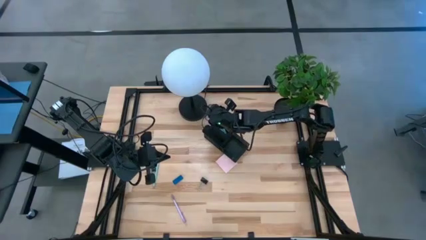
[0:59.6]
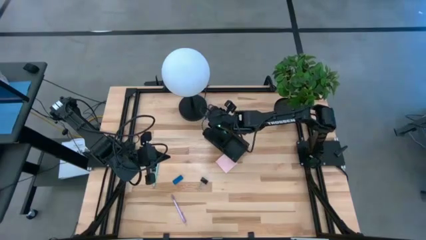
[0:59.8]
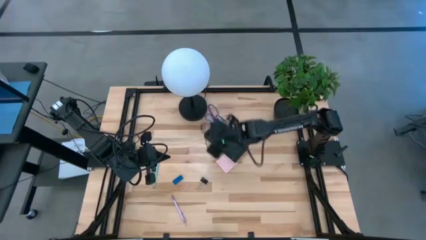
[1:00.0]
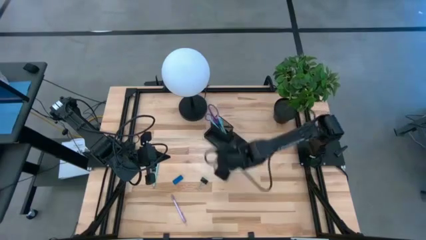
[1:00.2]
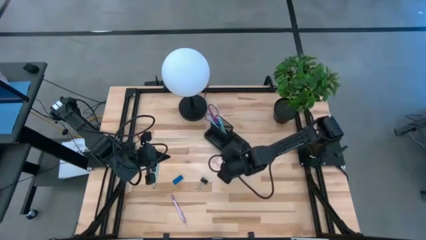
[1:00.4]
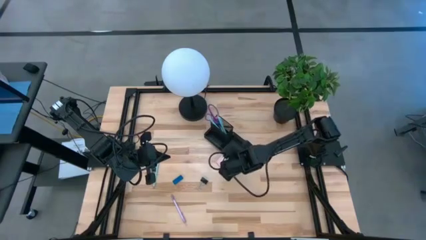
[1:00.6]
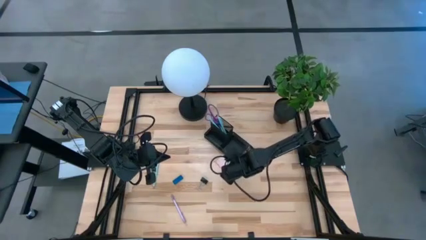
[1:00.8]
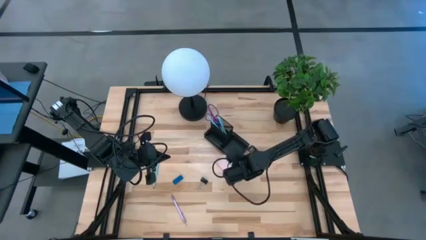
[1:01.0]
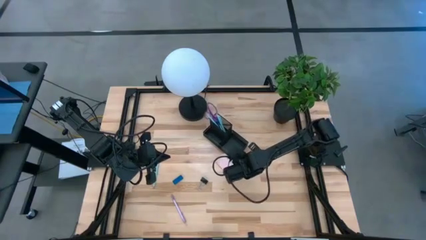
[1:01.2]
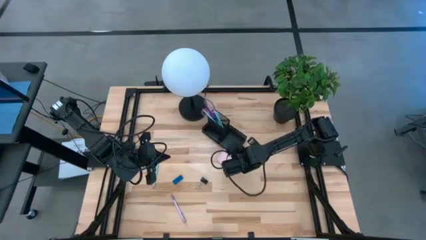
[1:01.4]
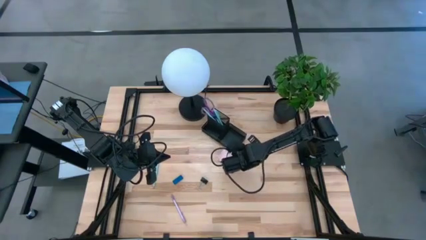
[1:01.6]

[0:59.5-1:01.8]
Task: Pick and place office supplies into organizer
Adjust the desk organizer

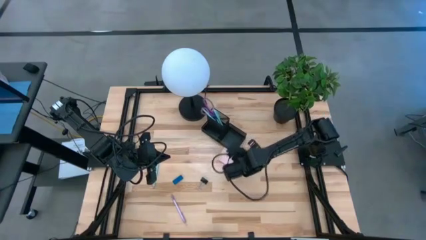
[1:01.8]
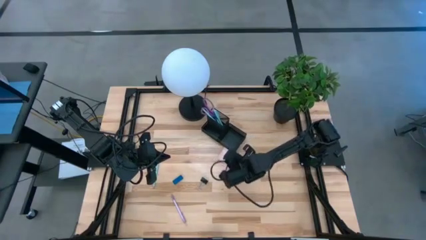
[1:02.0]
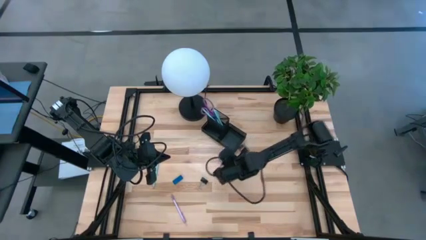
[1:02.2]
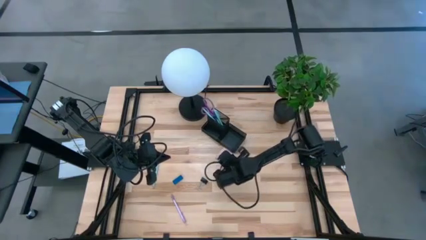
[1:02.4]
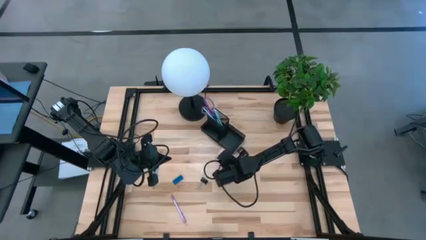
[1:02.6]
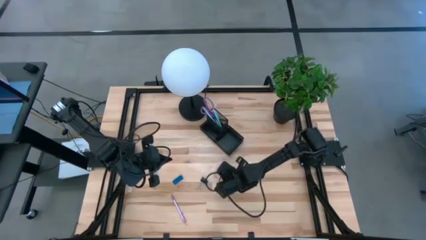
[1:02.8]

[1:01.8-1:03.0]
Adjust the pink sticky note

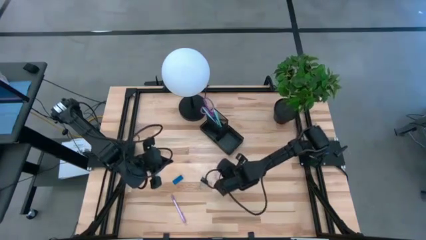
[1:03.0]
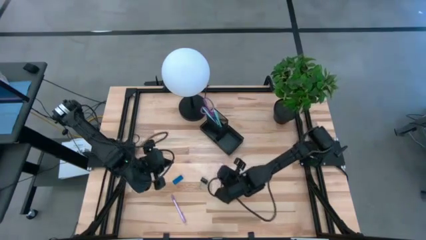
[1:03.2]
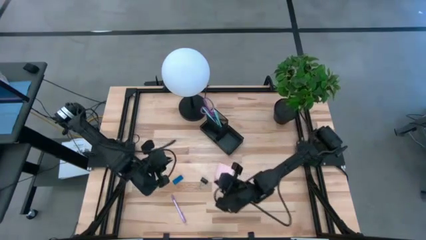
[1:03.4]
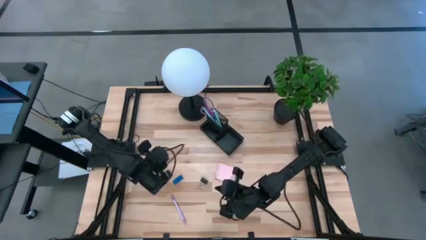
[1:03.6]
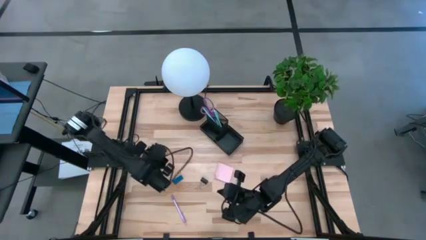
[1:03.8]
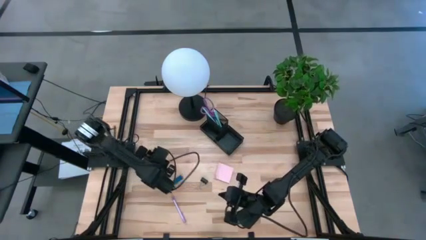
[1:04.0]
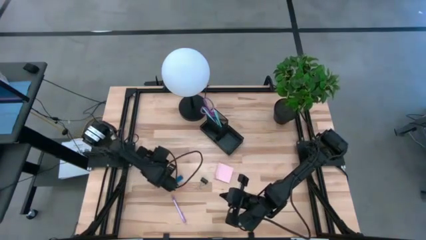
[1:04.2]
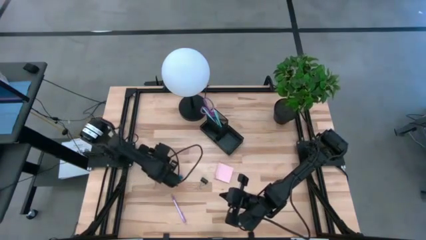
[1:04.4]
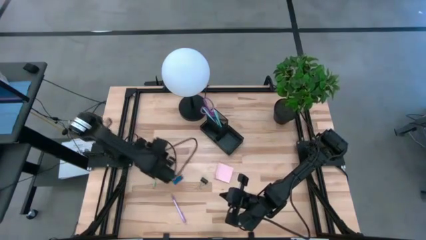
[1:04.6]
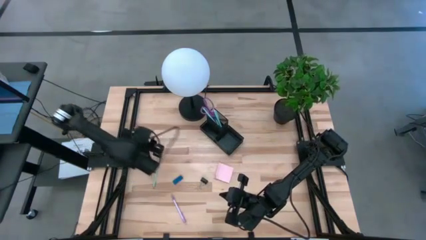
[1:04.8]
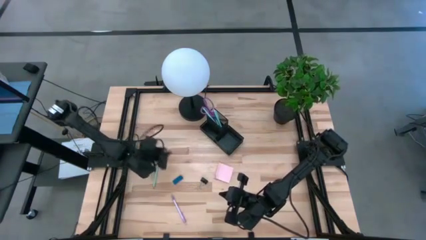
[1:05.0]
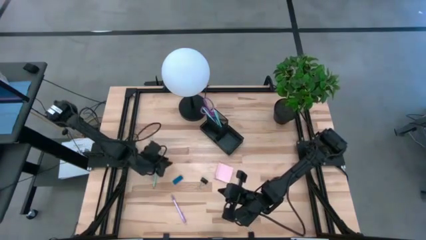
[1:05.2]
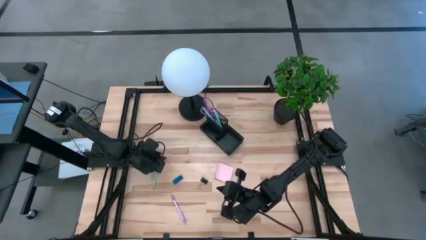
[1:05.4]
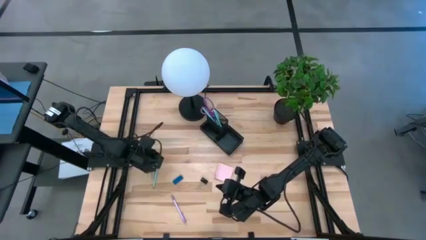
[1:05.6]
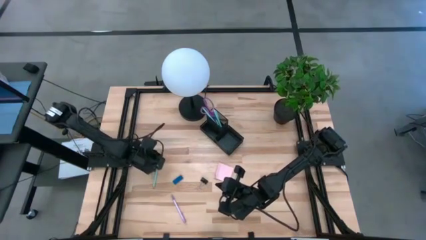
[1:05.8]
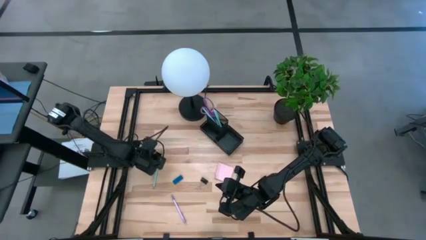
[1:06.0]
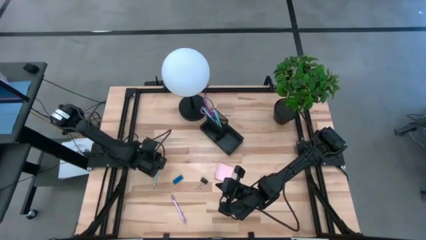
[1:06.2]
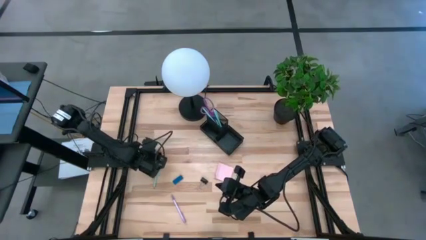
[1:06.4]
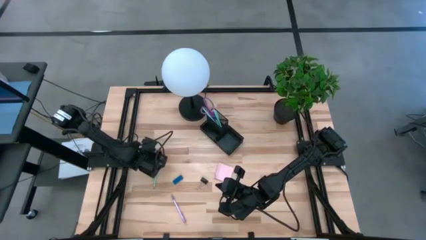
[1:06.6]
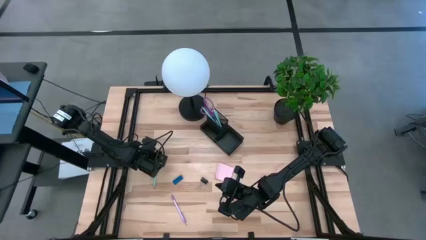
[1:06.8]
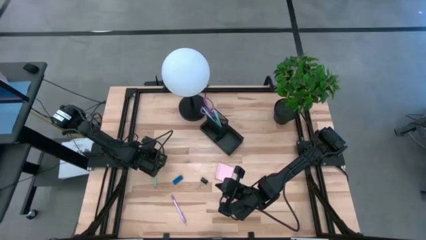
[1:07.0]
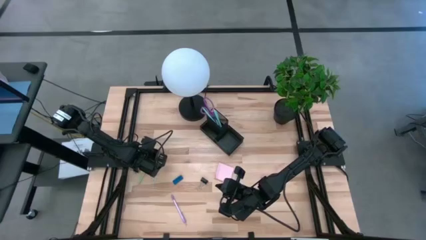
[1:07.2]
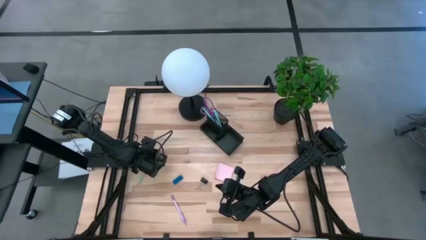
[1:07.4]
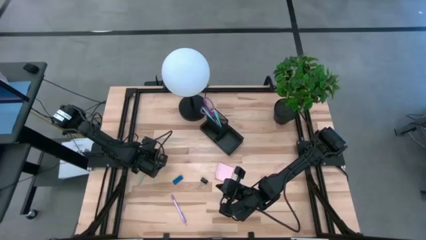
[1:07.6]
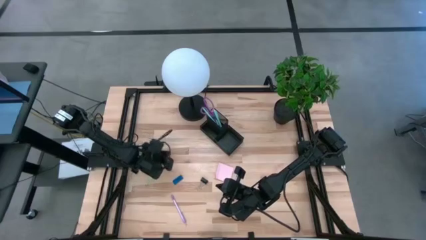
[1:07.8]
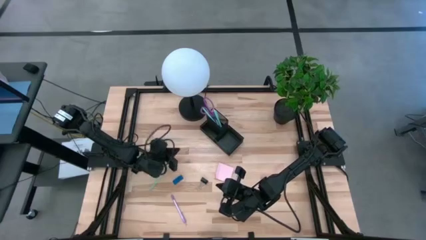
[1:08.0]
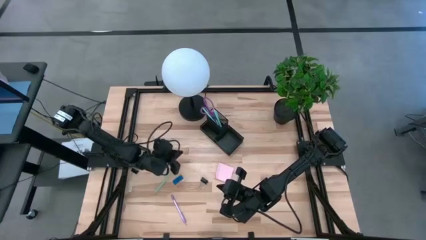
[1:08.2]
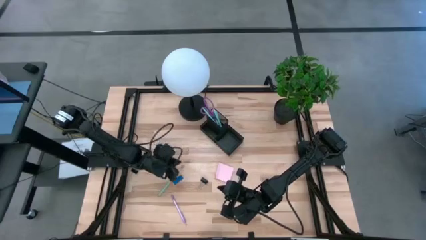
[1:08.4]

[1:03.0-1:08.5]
Put the blue pencil into the desk organizer

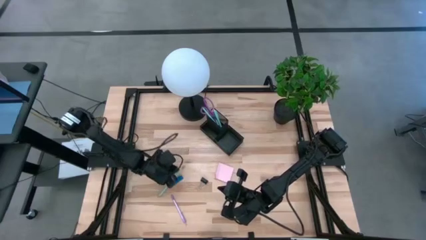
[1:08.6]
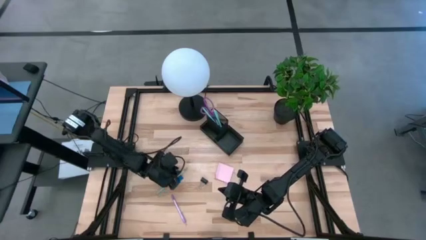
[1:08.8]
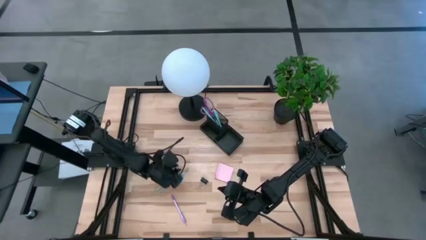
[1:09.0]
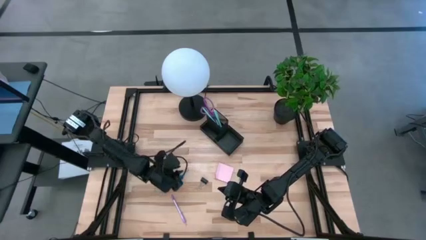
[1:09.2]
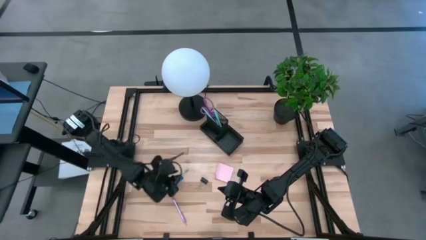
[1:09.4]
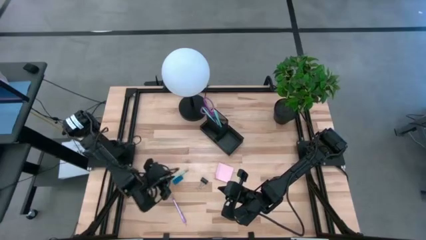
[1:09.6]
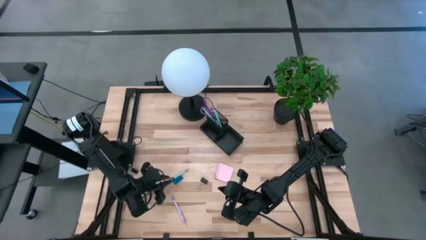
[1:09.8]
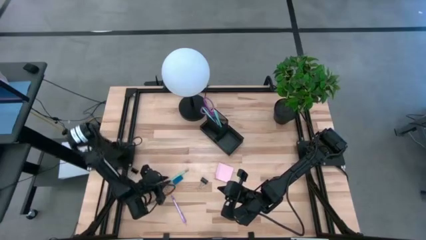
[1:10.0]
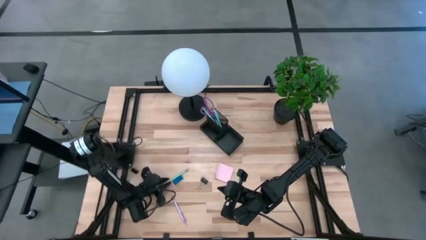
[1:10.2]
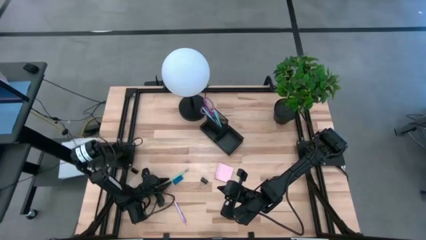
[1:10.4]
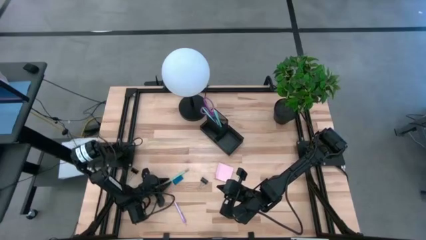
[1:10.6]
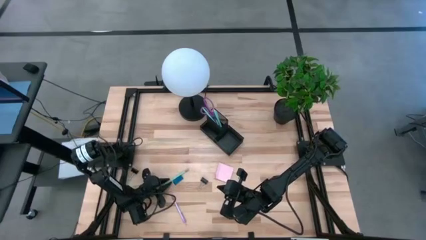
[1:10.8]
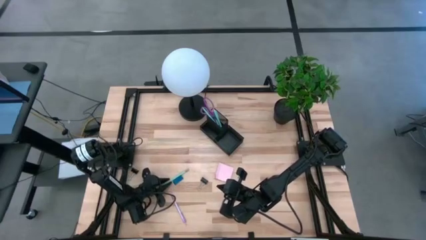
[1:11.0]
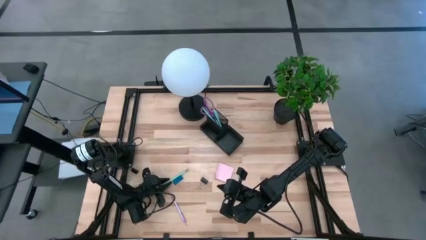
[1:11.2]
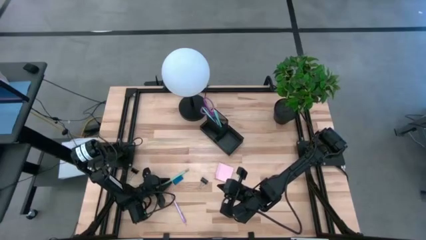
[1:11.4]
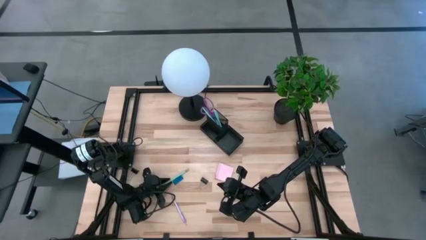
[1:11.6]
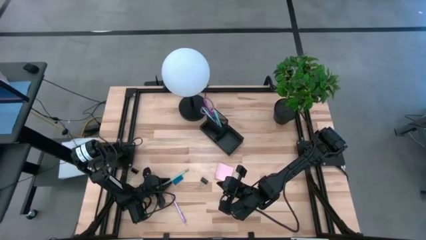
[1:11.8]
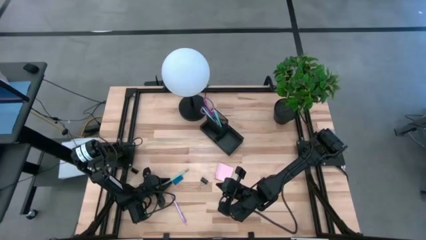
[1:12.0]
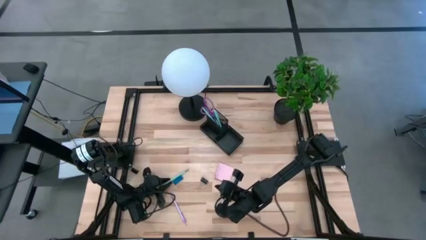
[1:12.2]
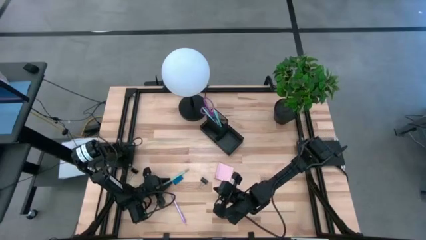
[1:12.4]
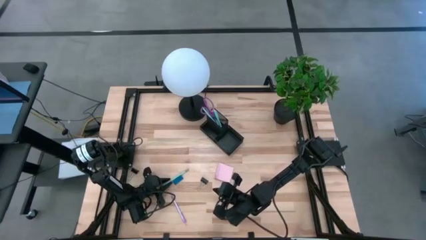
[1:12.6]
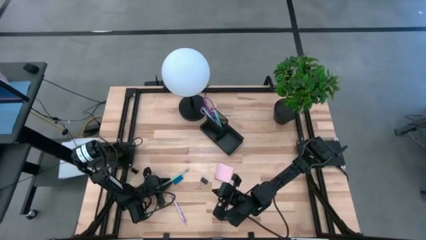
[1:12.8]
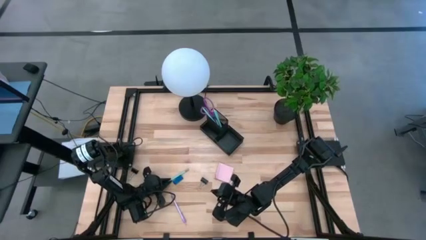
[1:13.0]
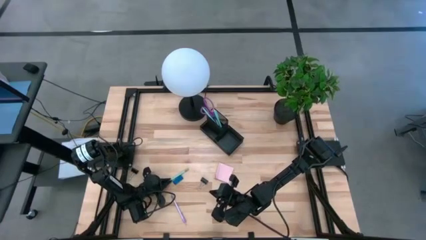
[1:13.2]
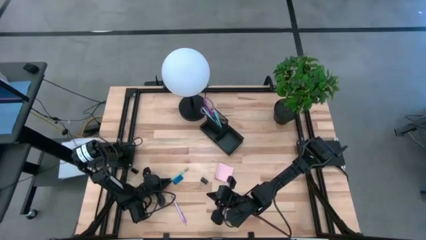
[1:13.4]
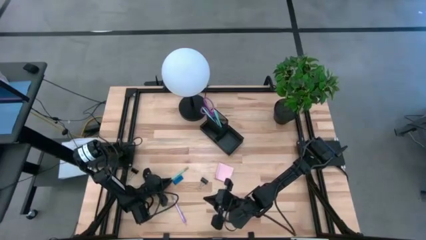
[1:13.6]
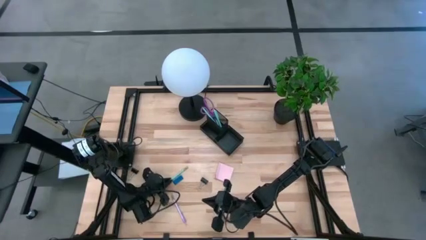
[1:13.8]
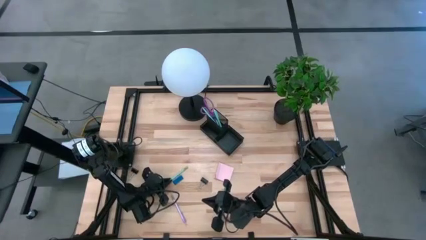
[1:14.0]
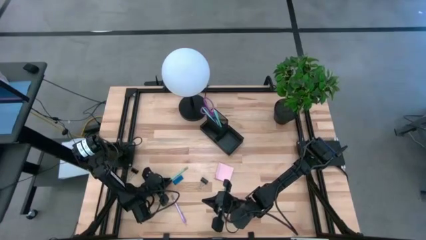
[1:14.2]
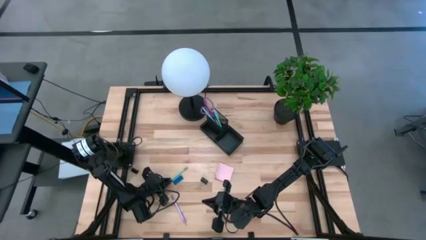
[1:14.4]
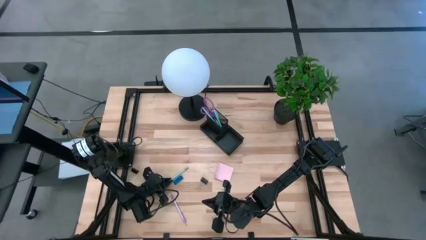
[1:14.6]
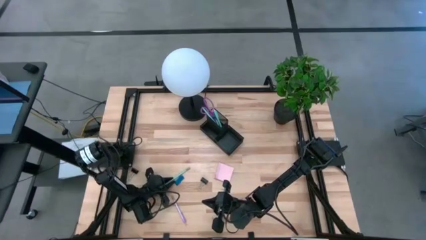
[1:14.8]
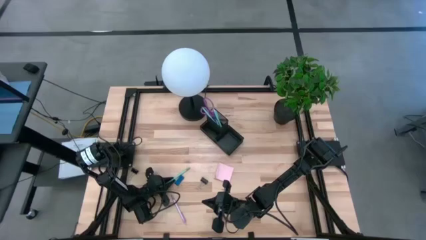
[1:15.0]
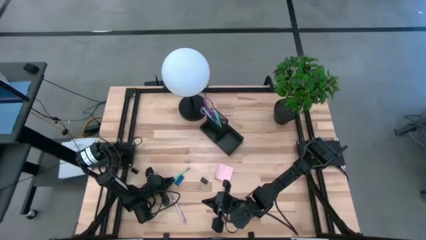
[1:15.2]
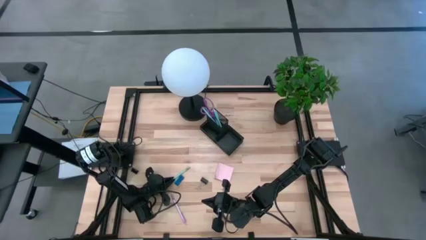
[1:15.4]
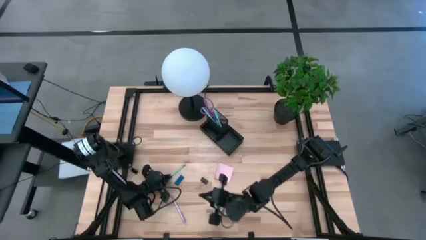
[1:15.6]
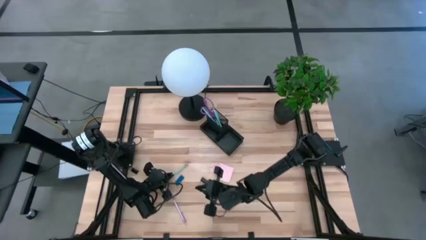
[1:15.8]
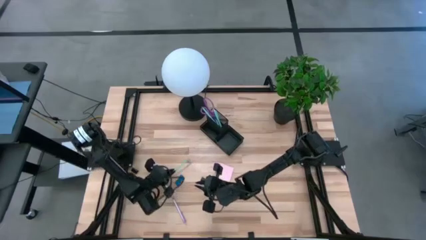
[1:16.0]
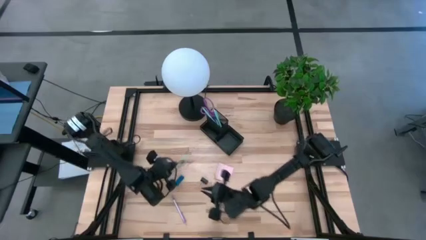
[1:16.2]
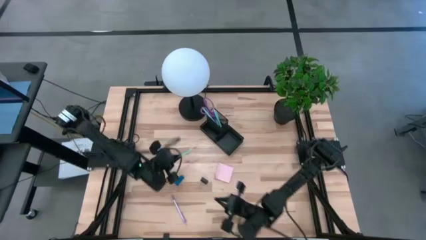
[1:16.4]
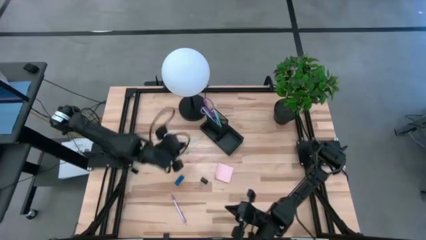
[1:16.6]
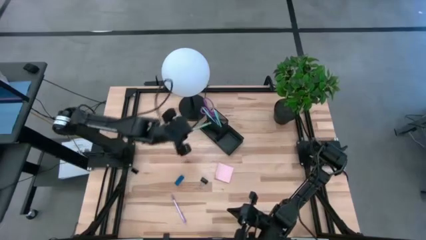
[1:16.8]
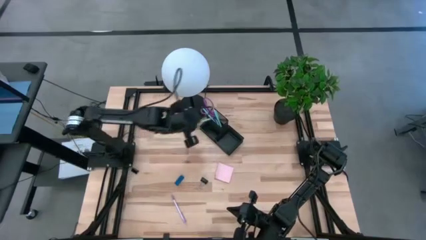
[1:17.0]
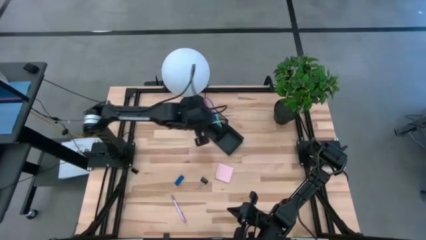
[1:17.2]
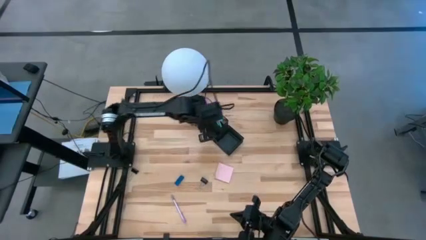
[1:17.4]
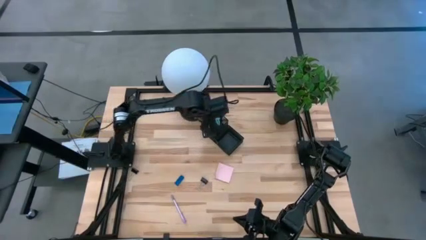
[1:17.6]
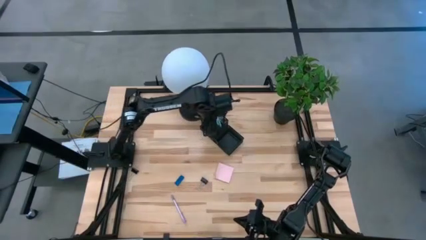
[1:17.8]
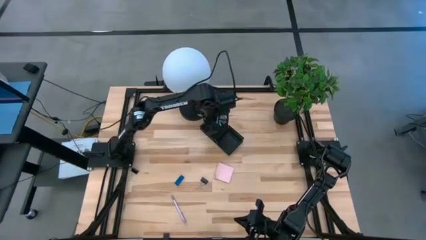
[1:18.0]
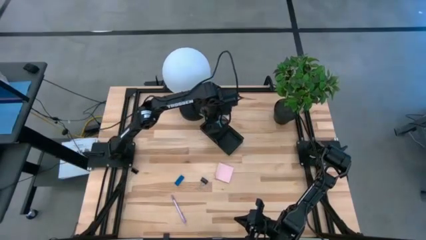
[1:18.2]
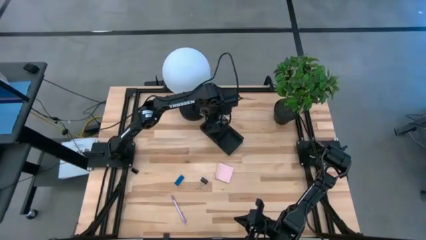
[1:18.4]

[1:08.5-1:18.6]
Put the blue pencil into the desk organizer
